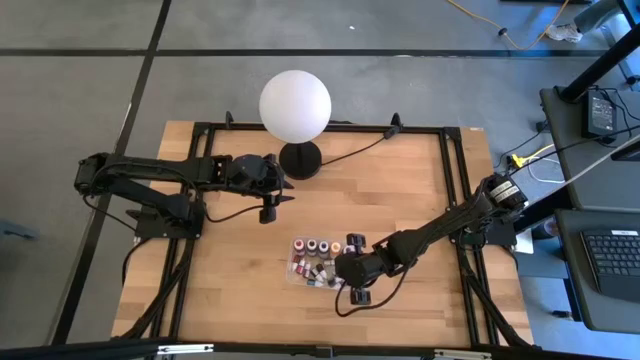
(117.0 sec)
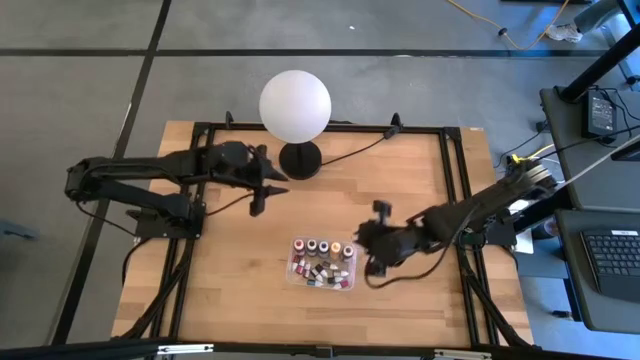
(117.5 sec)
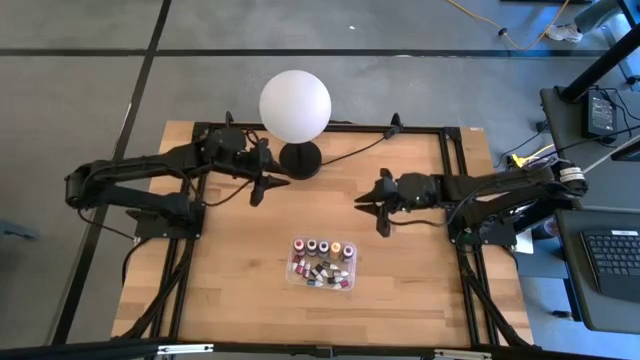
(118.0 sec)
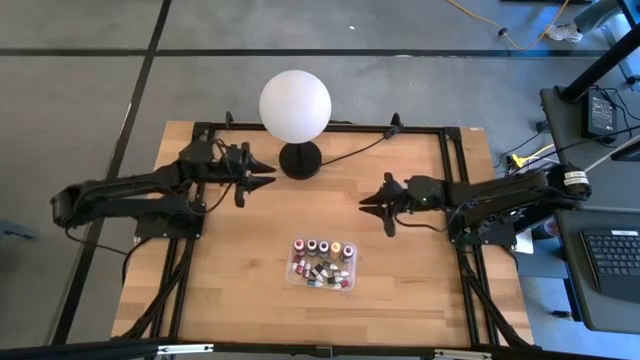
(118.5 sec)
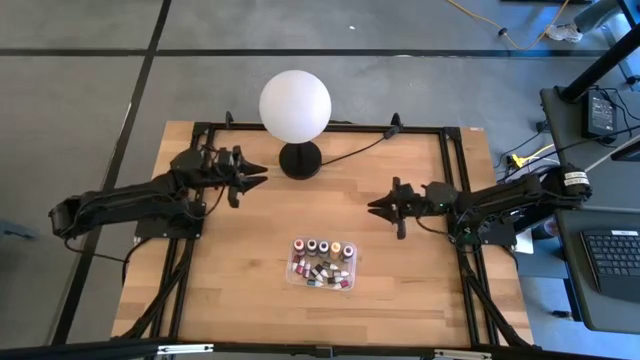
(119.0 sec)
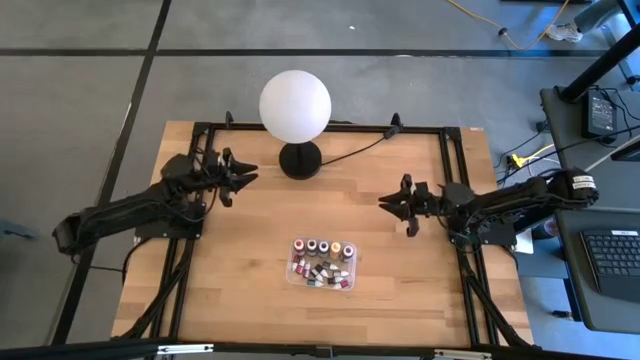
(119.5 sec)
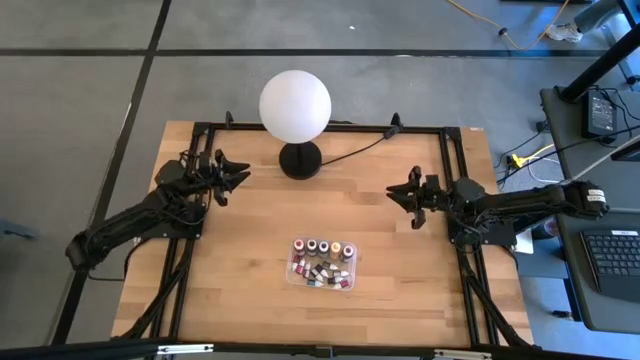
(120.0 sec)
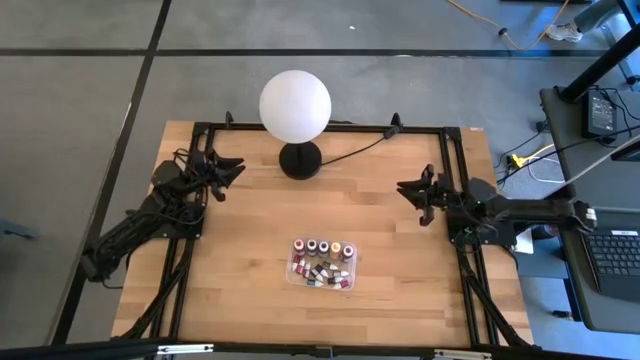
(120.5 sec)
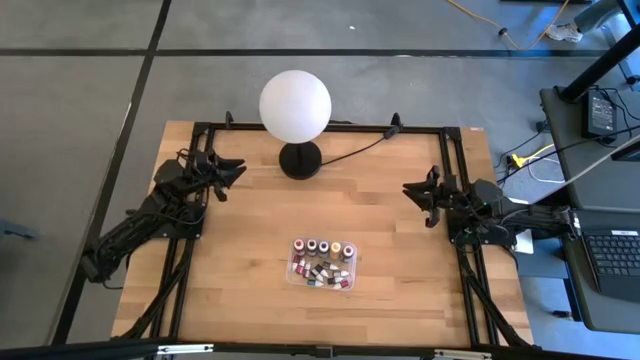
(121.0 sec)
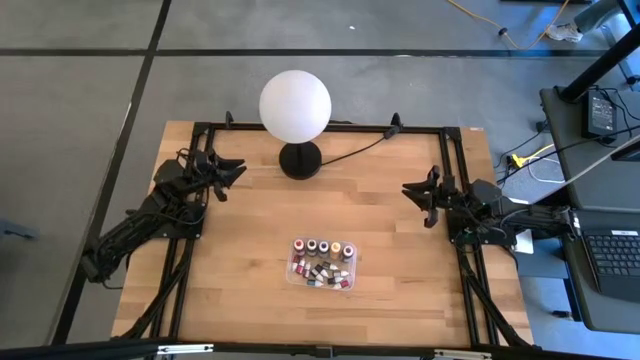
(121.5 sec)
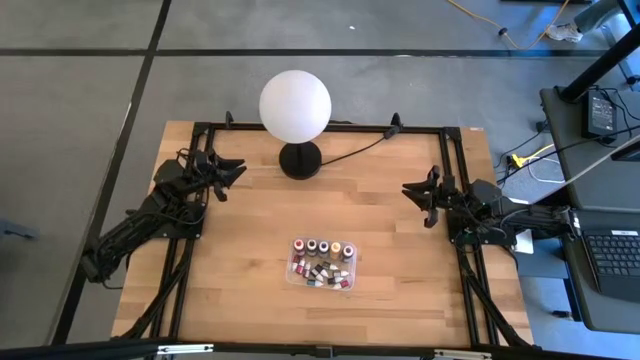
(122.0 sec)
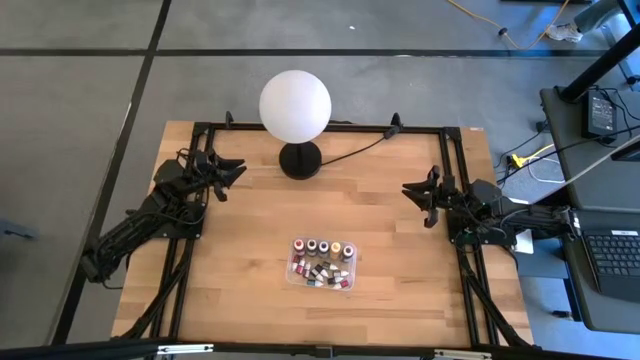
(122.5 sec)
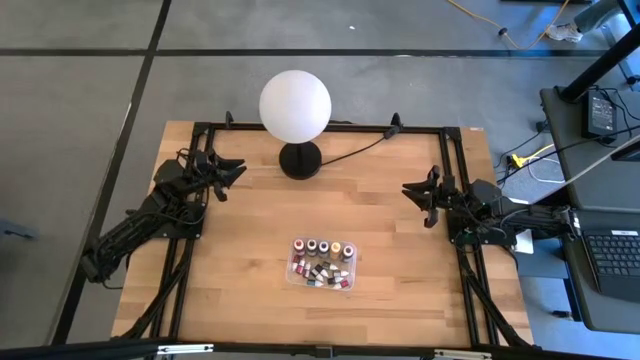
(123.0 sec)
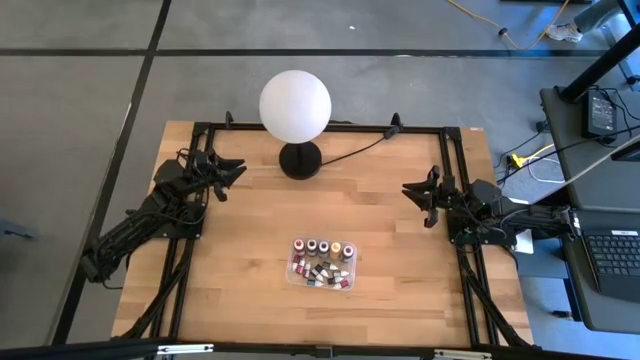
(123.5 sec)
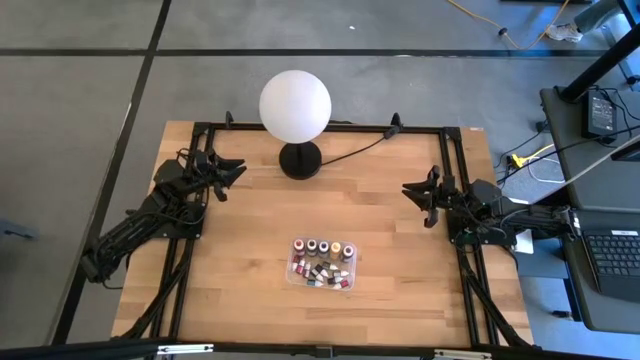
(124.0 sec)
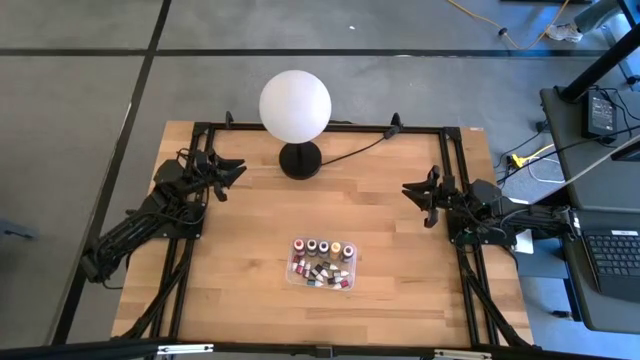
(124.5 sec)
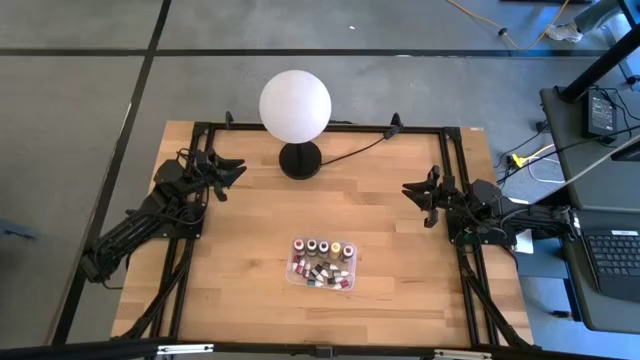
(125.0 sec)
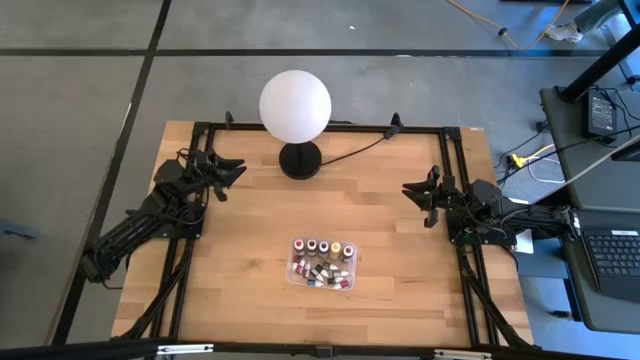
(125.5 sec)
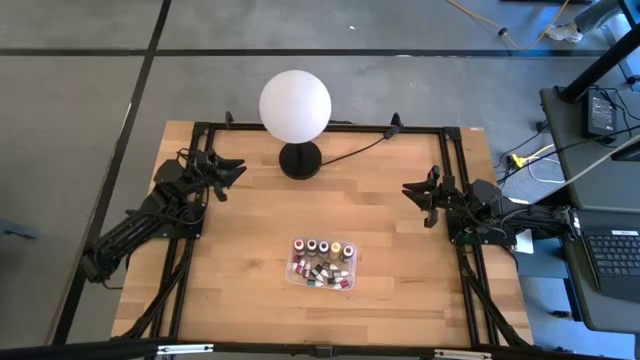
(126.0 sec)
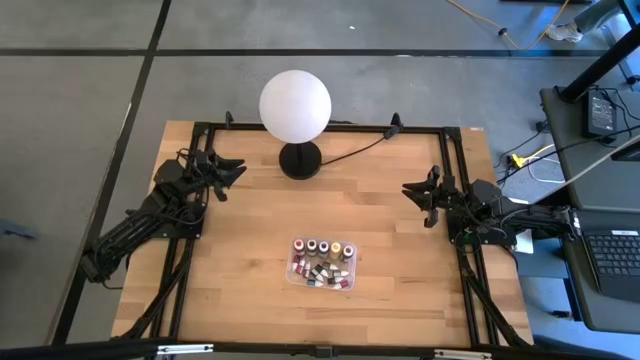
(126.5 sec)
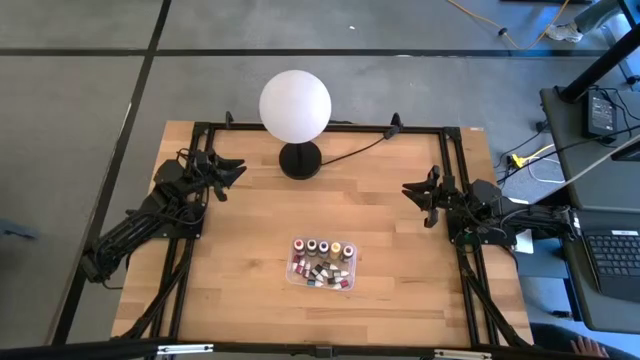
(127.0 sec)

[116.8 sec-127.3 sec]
Task: Pick & Place food coloring
Return to Home Position

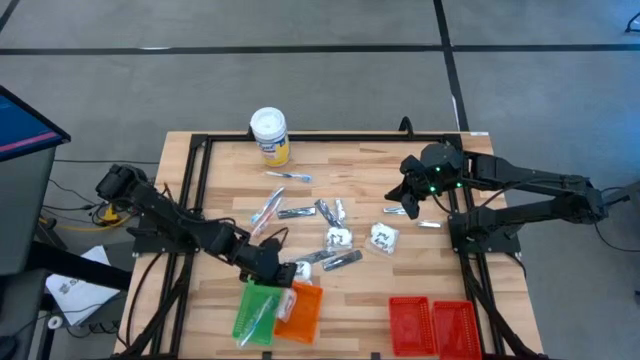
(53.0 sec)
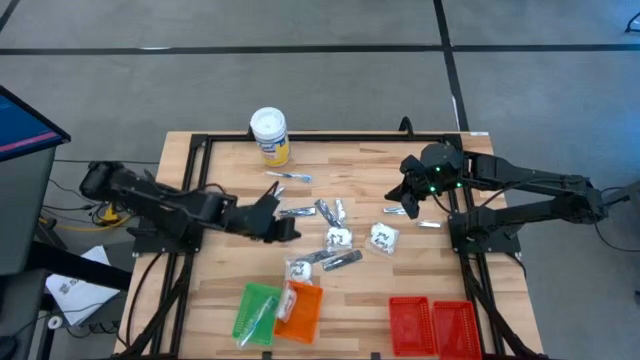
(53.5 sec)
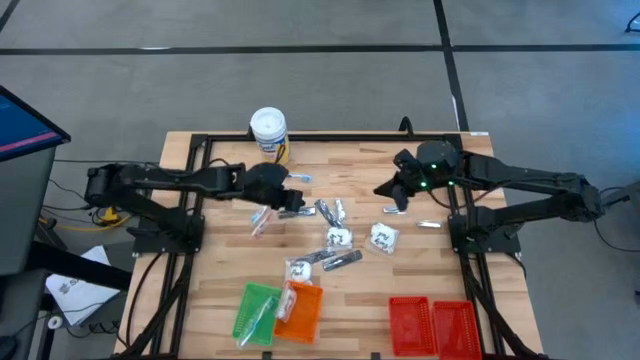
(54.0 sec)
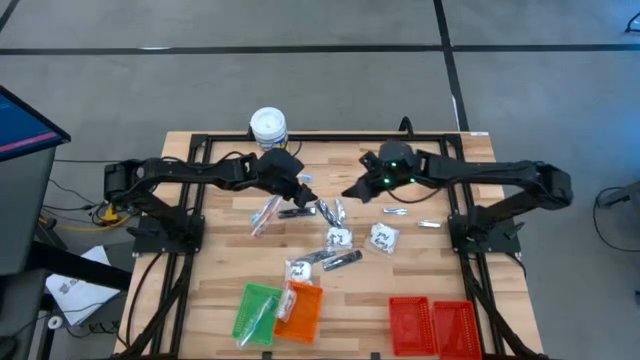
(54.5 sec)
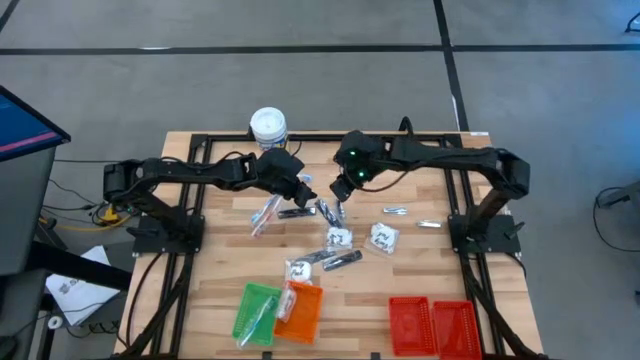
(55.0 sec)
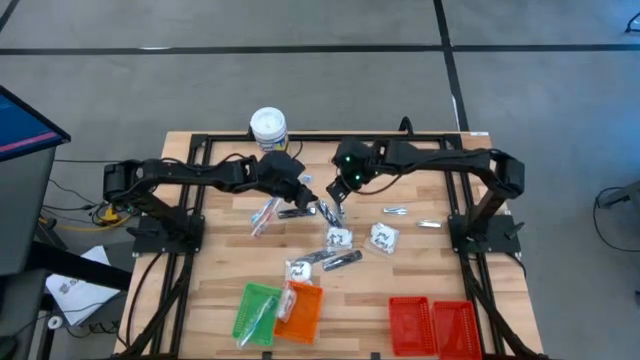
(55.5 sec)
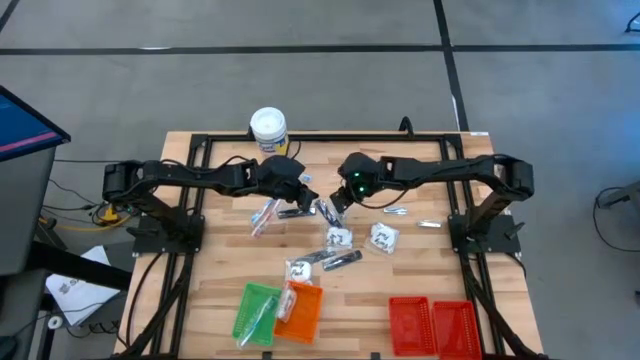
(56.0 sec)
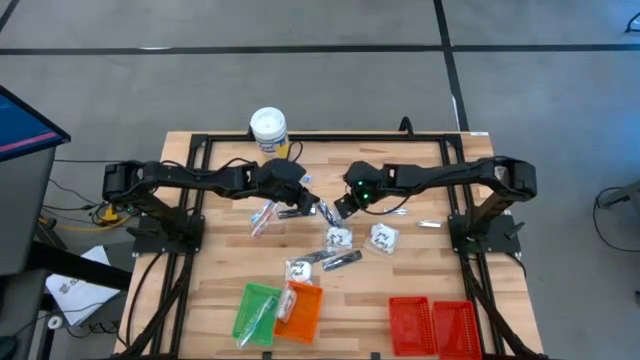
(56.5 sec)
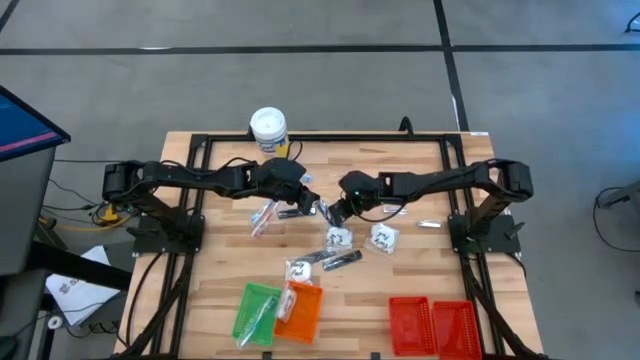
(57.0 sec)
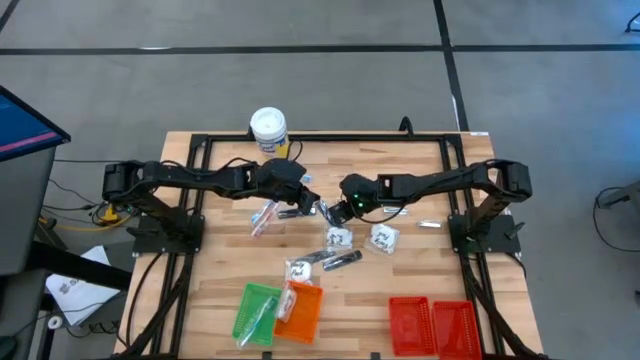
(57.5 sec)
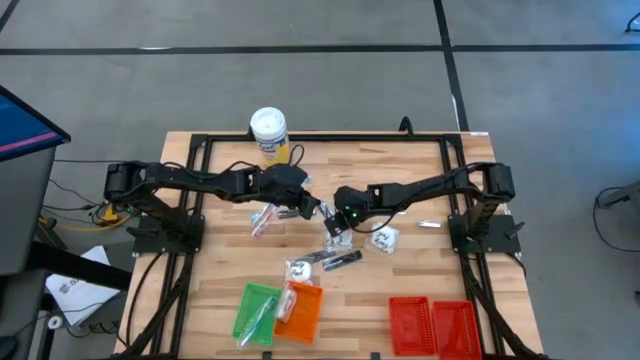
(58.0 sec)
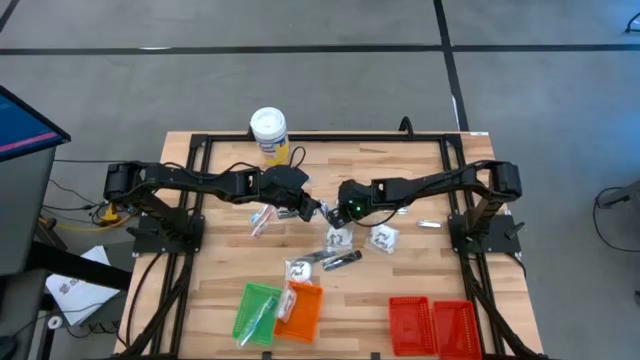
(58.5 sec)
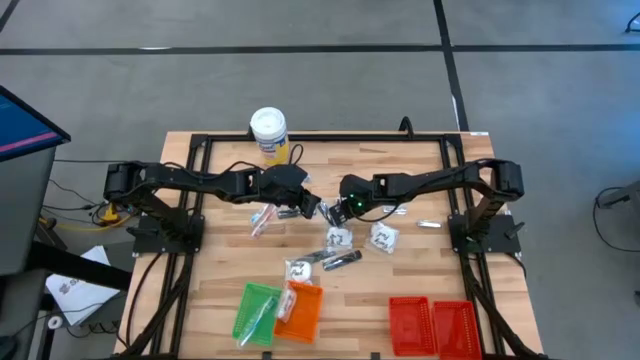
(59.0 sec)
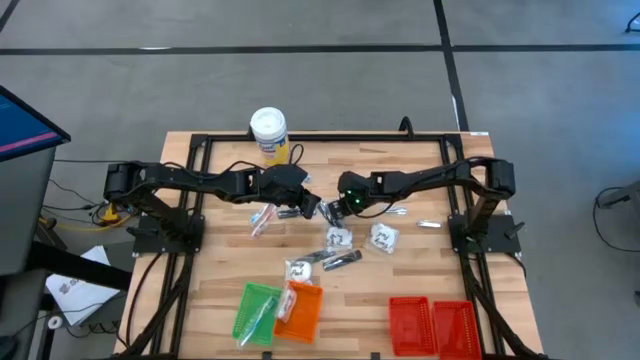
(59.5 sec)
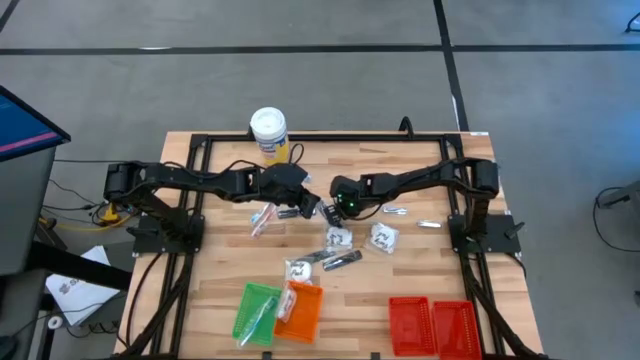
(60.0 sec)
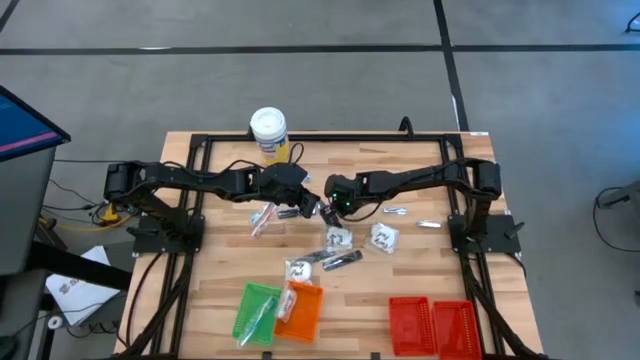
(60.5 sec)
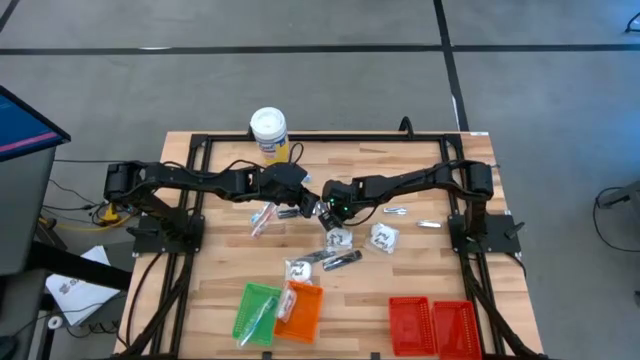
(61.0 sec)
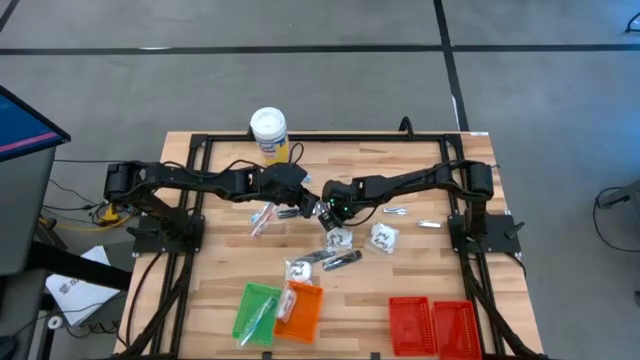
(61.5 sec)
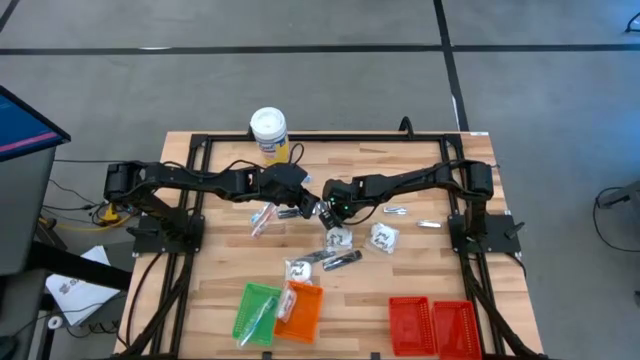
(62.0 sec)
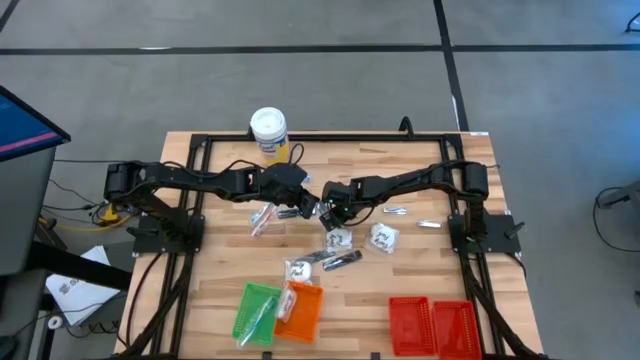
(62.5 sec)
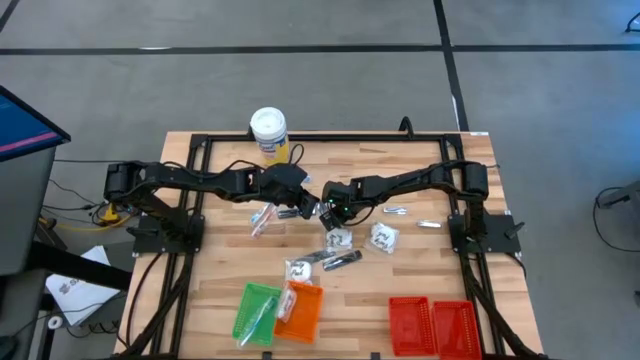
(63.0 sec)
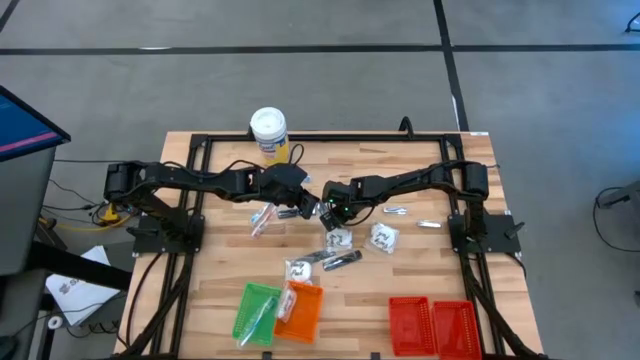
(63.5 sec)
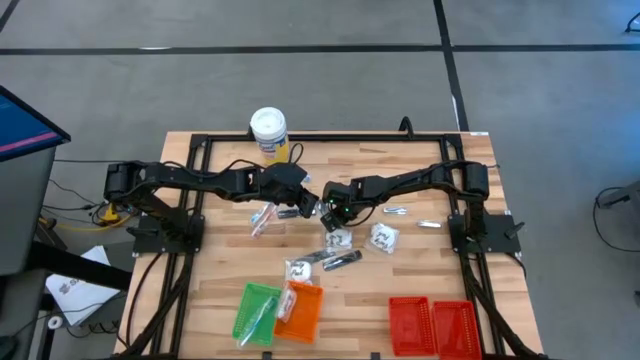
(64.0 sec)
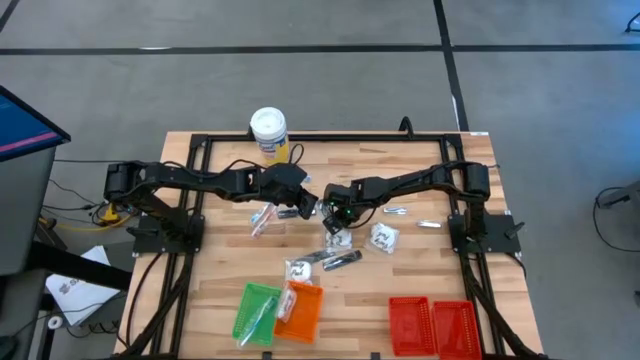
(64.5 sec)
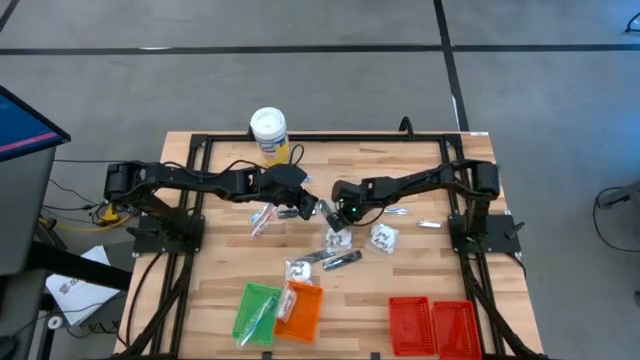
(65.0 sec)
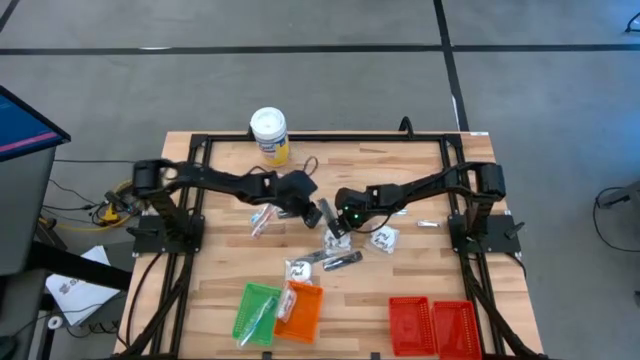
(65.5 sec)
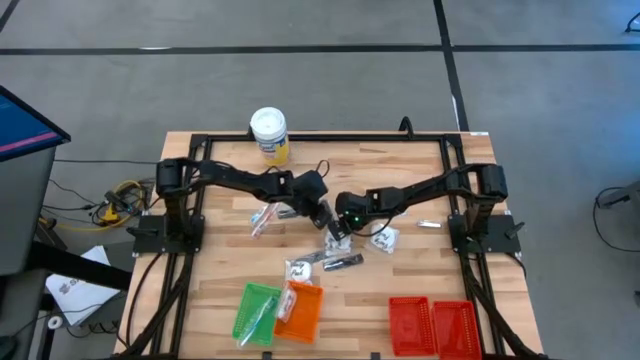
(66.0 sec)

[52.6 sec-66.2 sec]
Task: Pick & Place Travel size toiletries
Put the black comb into the left red basket
